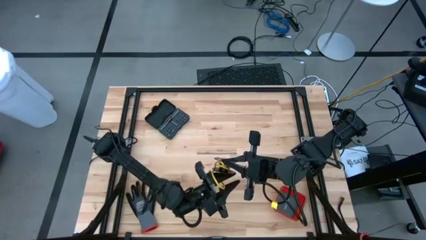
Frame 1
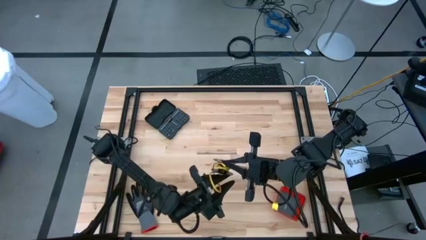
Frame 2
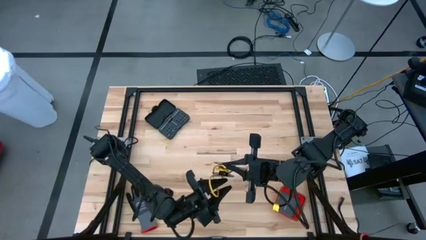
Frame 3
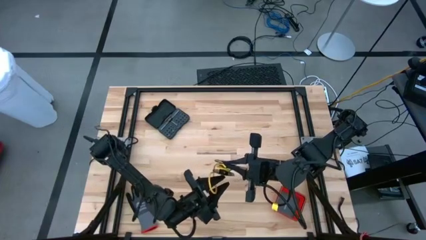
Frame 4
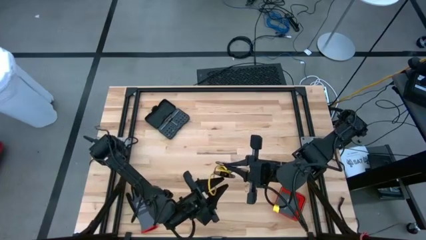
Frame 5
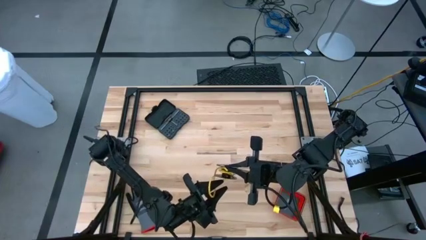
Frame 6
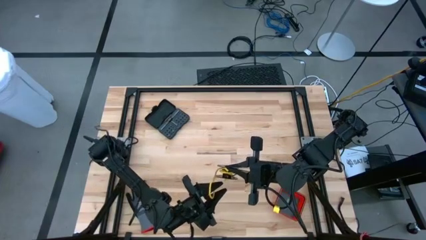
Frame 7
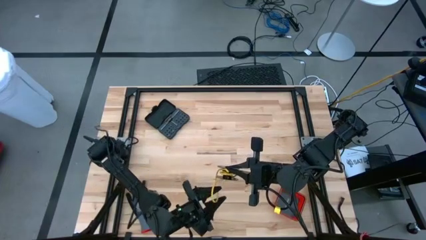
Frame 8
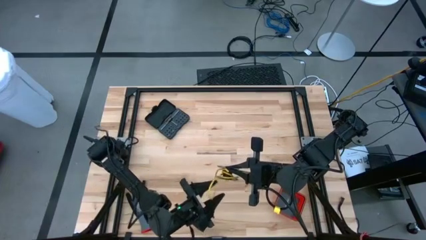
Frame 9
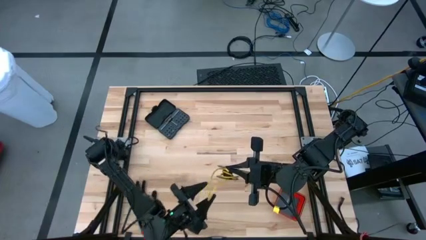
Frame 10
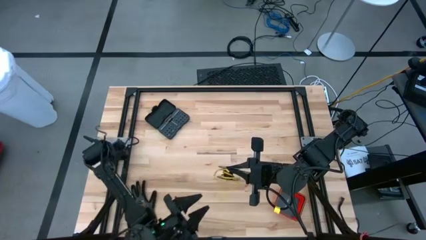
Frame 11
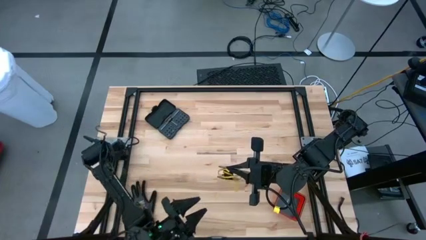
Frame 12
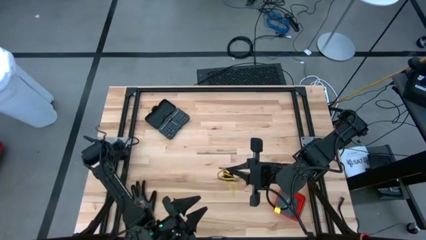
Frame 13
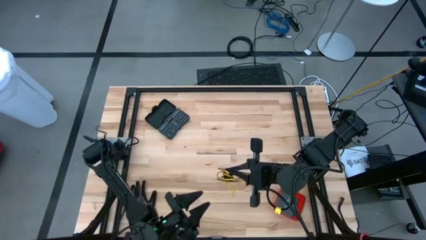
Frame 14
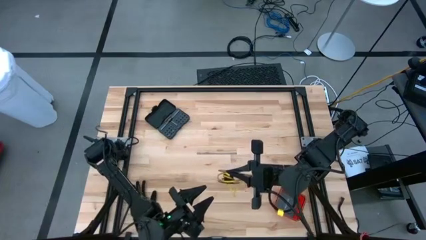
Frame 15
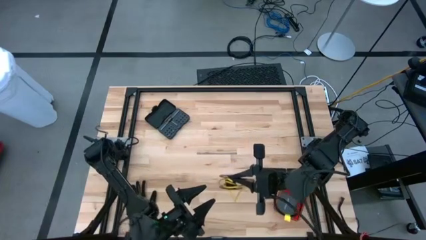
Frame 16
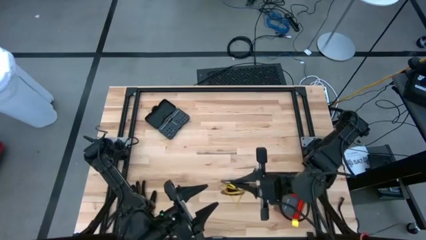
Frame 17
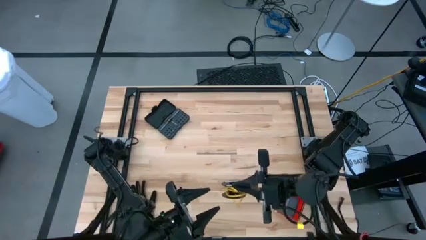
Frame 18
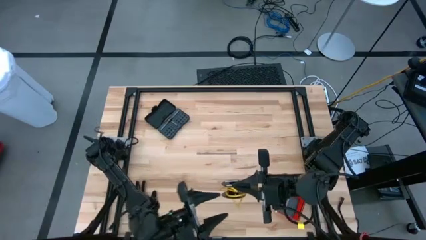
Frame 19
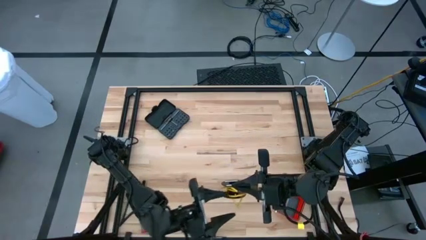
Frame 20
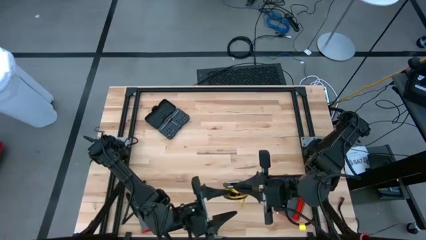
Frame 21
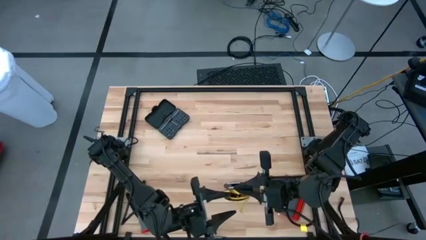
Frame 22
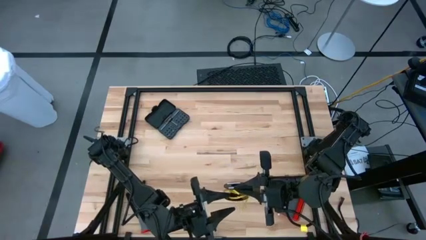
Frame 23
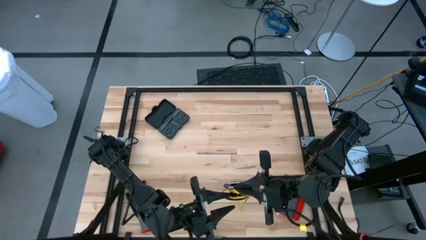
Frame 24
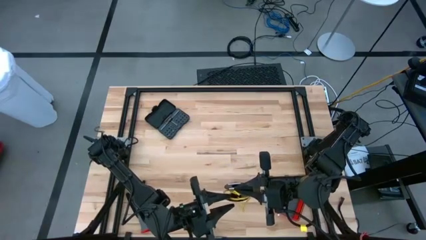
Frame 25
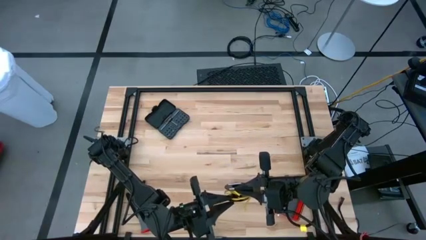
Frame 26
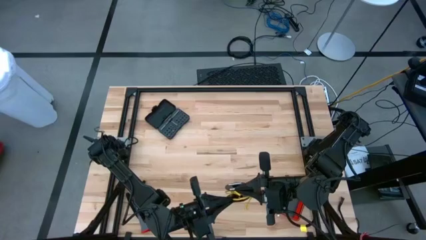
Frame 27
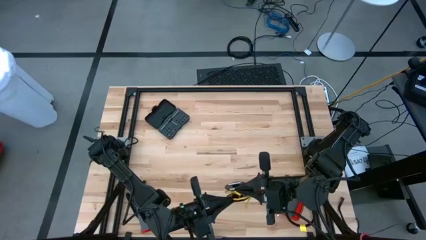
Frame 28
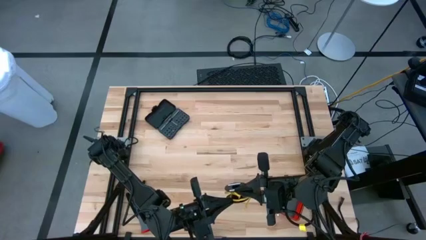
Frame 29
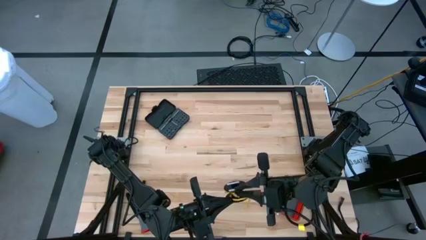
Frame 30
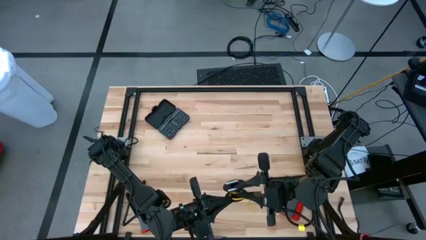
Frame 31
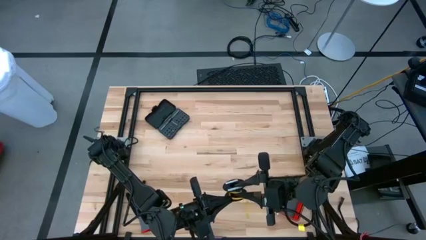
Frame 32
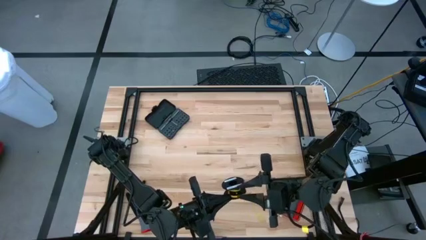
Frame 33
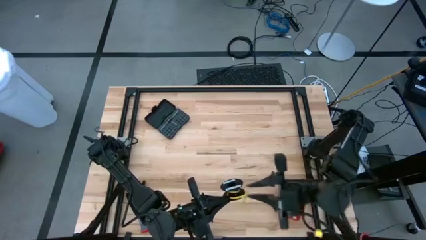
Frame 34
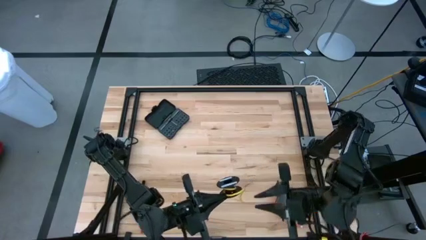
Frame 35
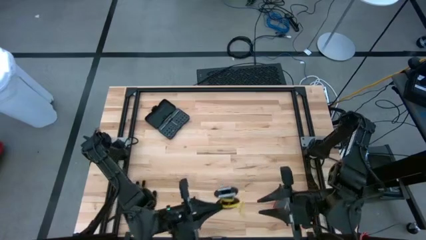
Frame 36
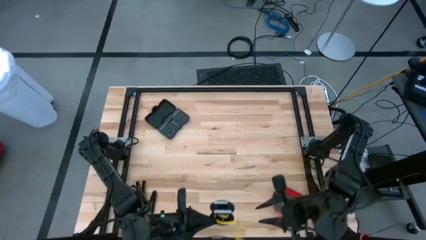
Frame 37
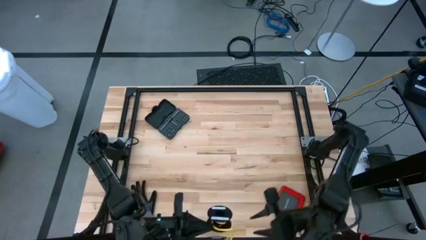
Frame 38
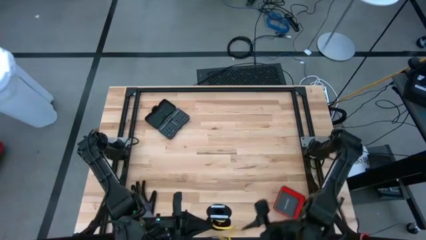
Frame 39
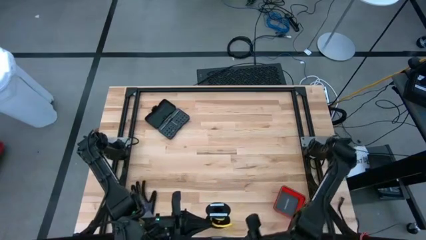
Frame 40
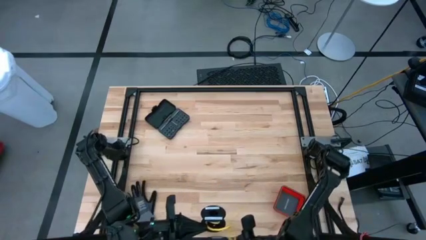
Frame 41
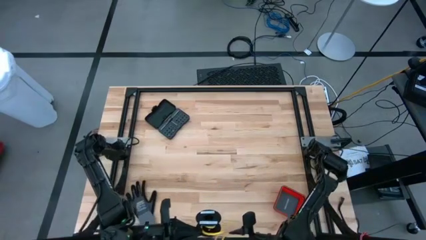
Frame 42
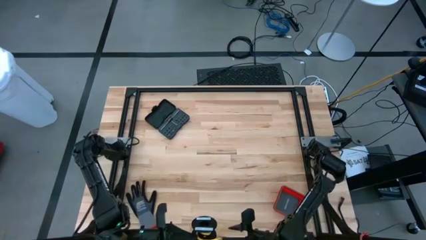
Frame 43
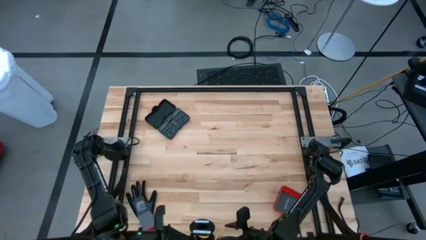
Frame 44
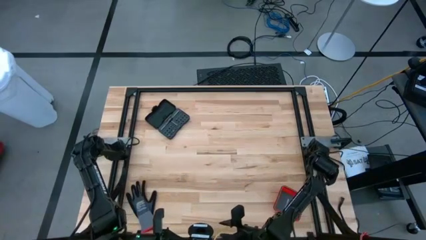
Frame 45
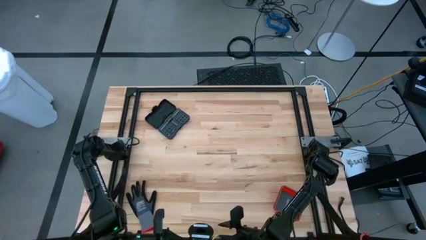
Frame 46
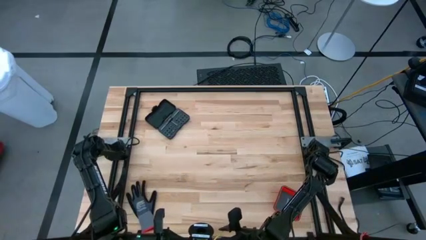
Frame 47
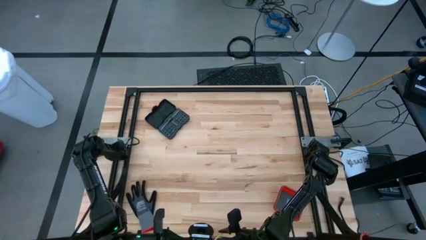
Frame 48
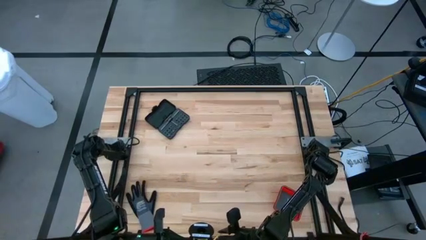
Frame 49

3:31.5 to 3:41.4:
Task: Coil cords
Coil the yellow wire onto the spool

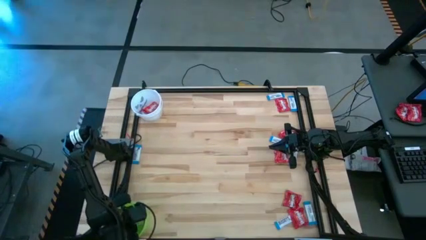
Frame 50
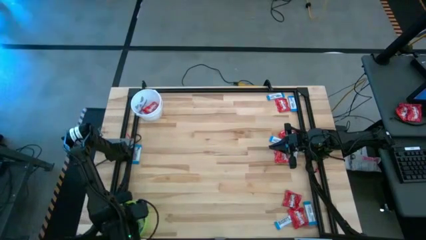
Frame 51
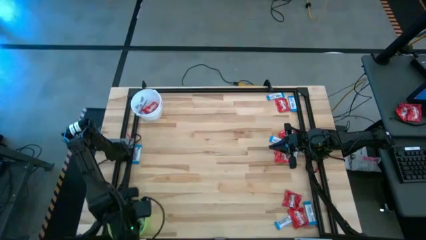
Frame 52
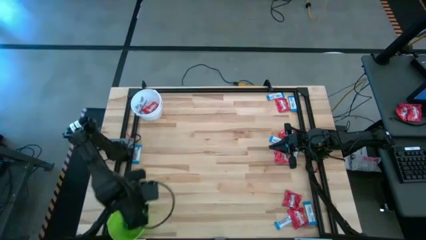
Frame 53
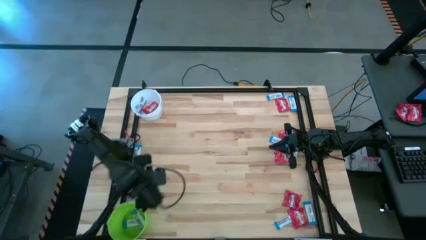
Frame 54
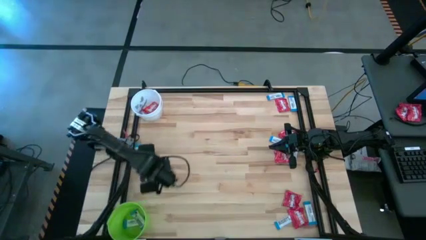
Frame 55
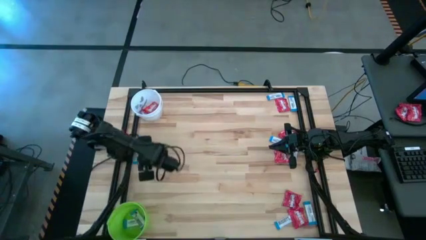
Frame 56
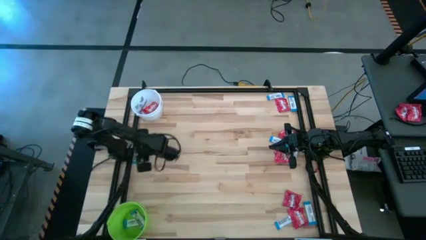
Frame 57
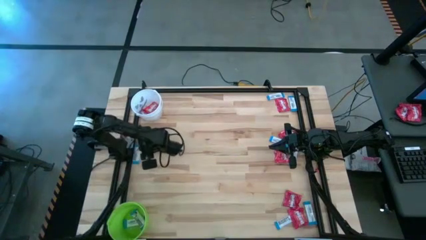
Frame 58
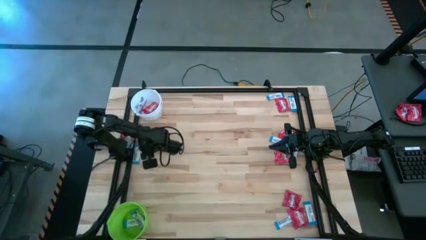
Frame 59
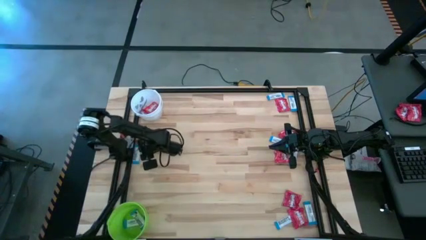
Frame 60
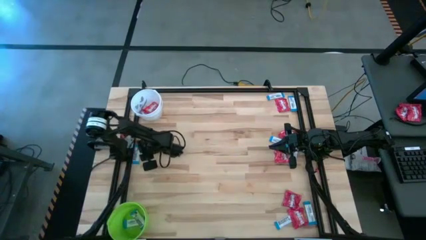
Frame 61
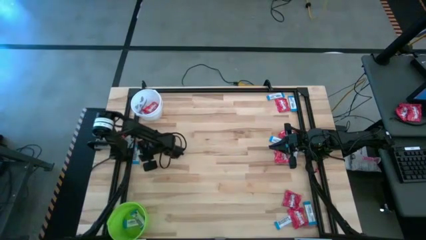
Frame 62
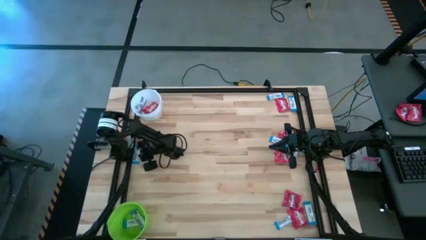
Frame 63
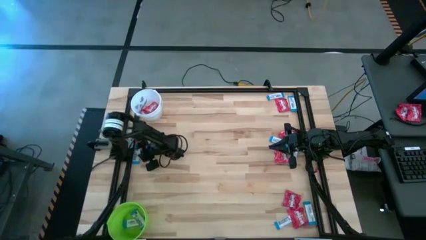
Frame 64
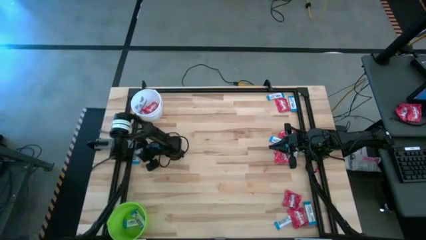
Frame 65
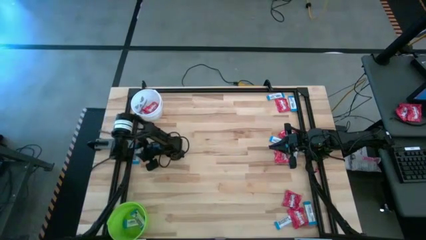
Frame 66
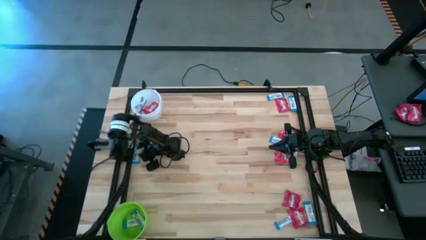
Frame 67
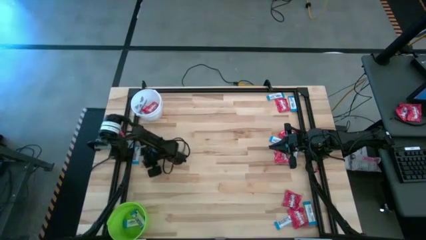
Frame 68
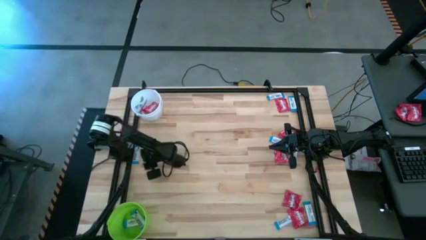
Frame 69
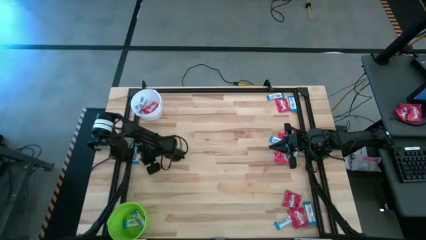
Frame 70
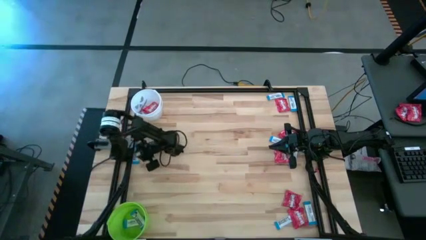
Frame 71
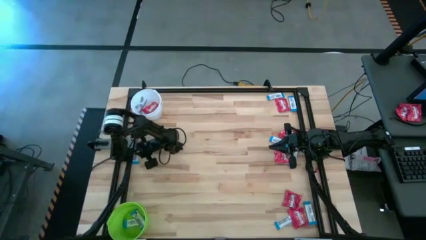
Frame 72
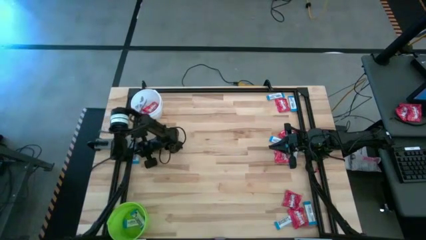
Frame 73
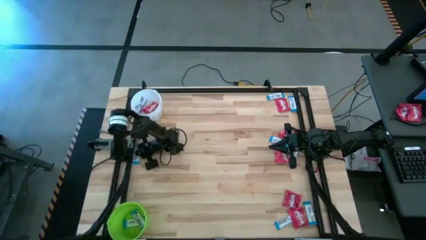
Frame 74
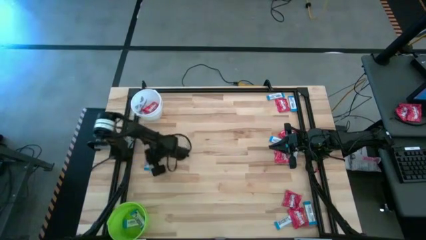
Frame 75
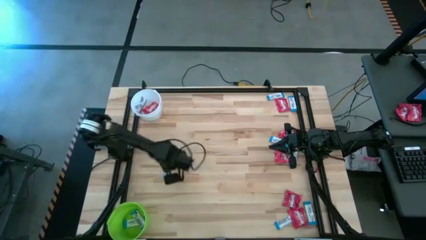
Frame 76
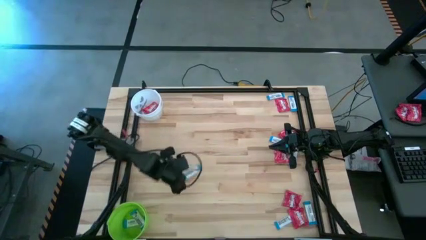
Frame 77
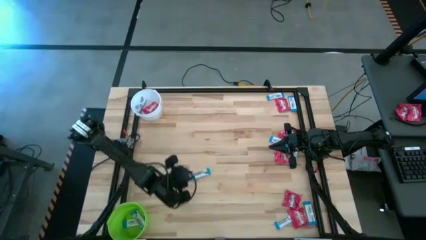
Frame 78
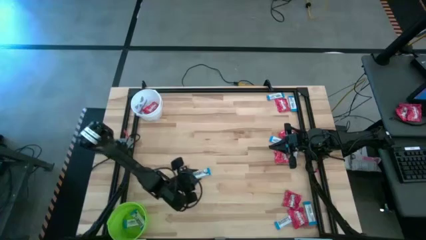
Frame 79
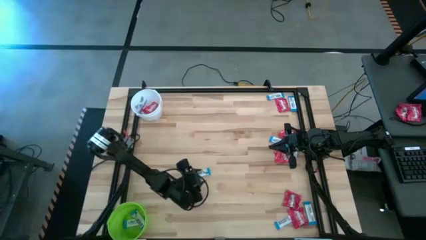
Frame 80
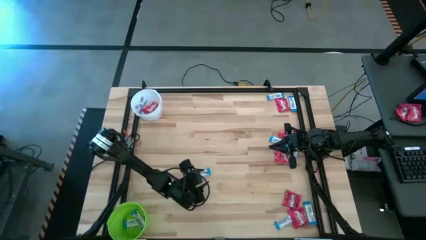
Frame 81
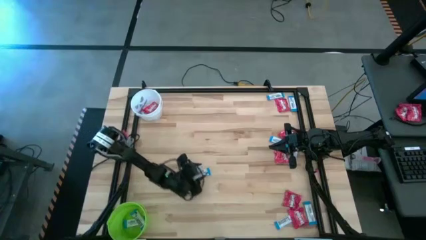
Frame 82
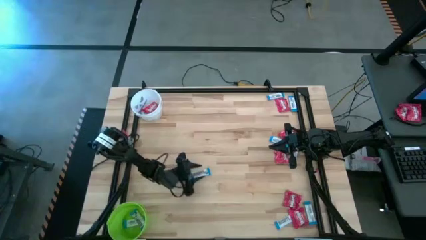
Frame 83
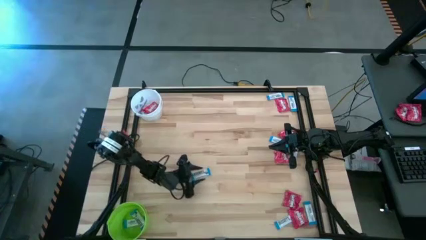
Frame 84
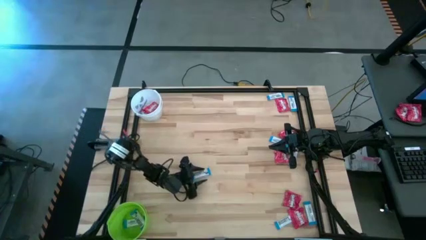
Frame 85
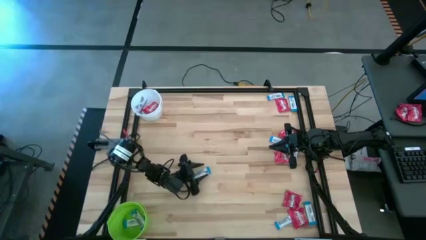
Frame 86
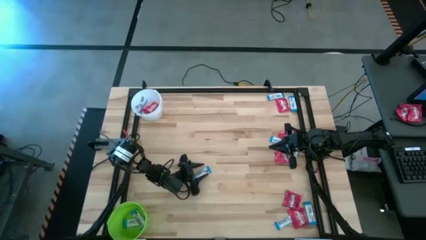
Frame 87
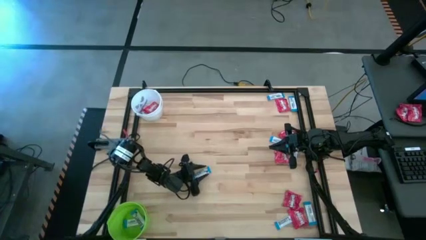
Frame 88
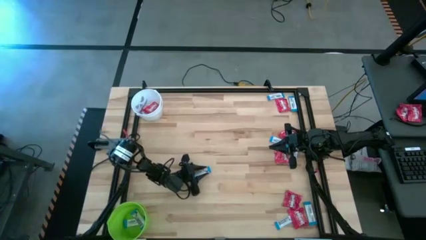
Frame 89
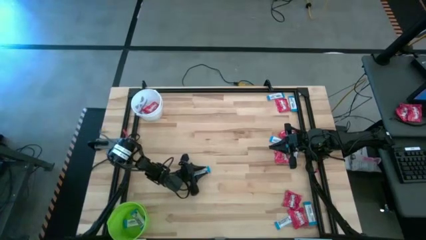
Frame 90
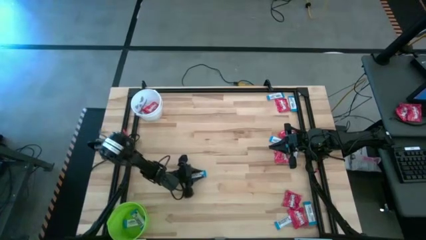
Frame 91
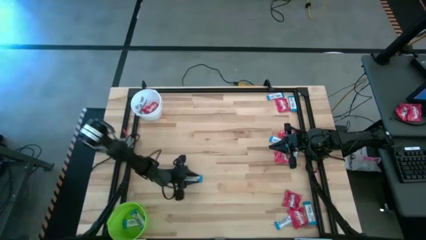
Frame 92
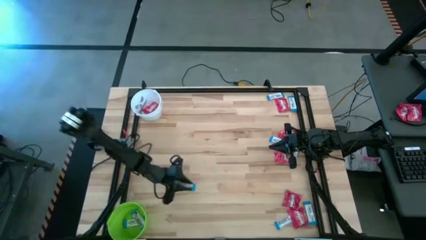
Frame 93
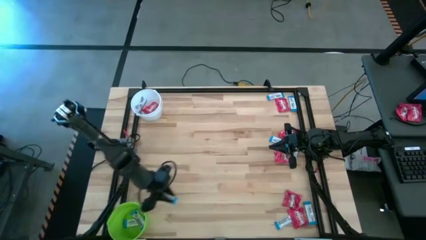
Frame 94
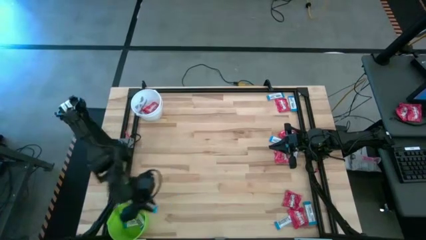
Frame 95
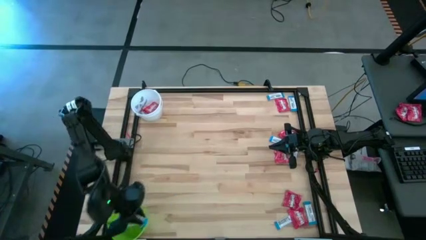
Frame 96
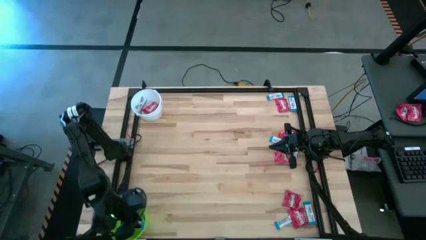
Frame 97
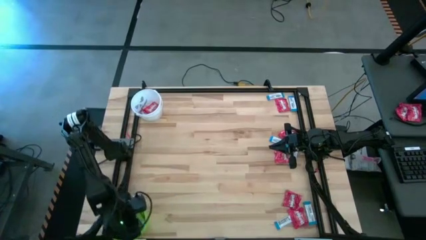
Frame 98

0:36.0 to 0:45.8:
Task: Sort candy by brand, put in halloween buckets
Put the blue chocolate bar into the green bucket
